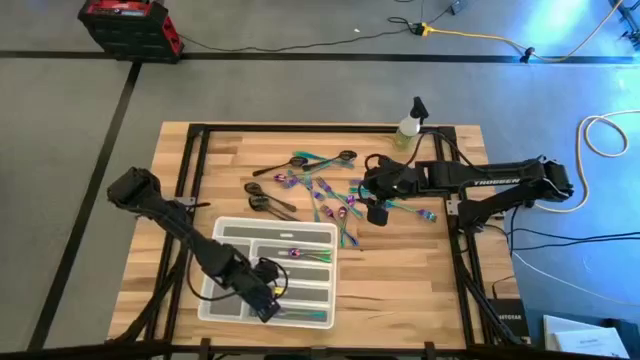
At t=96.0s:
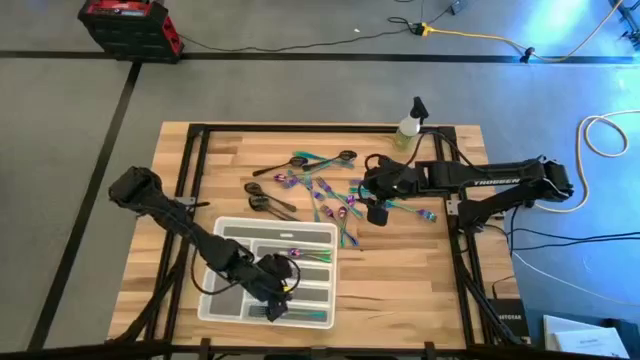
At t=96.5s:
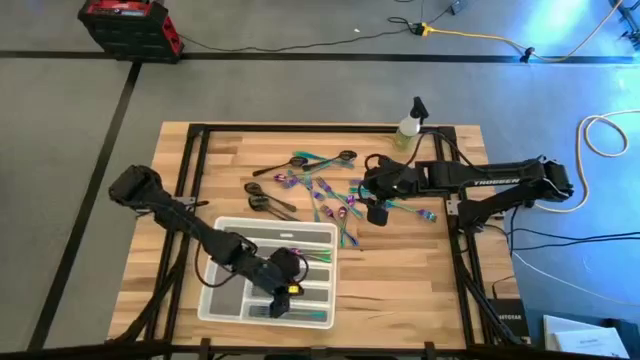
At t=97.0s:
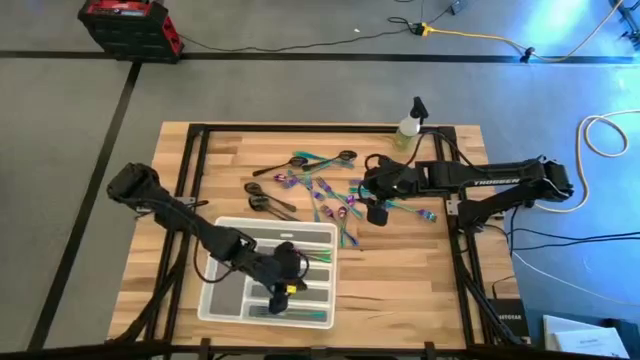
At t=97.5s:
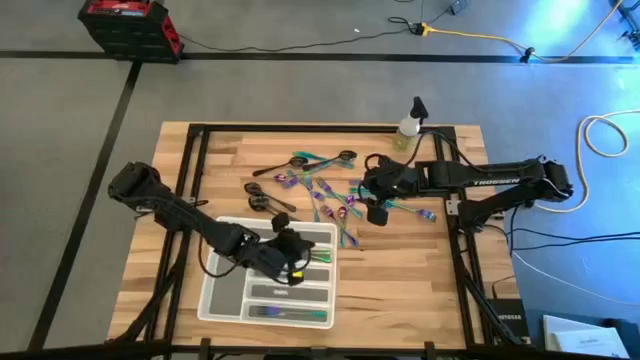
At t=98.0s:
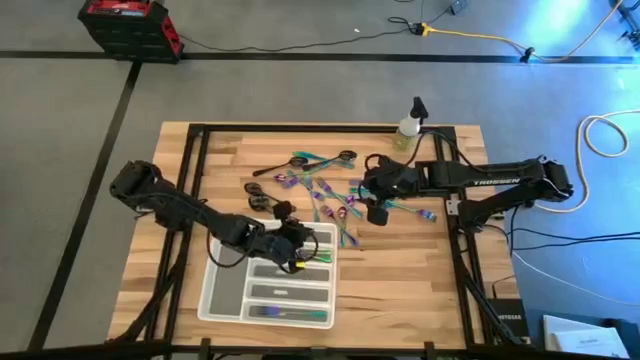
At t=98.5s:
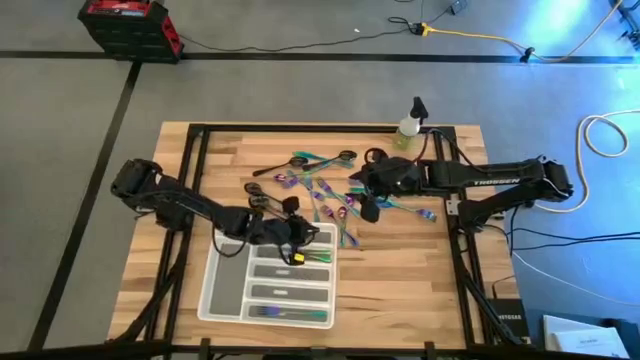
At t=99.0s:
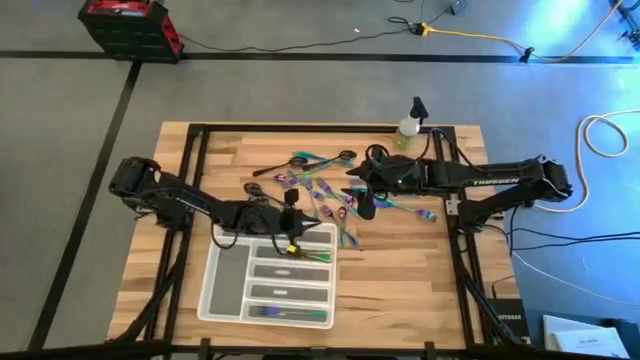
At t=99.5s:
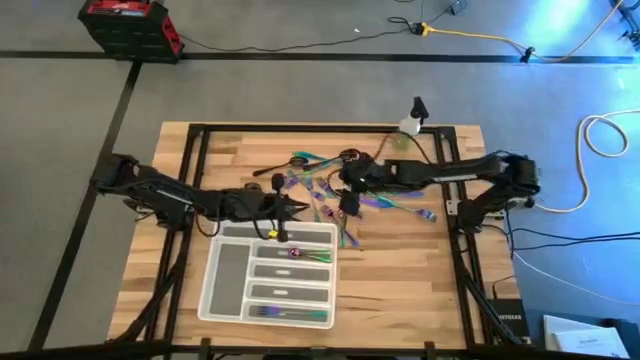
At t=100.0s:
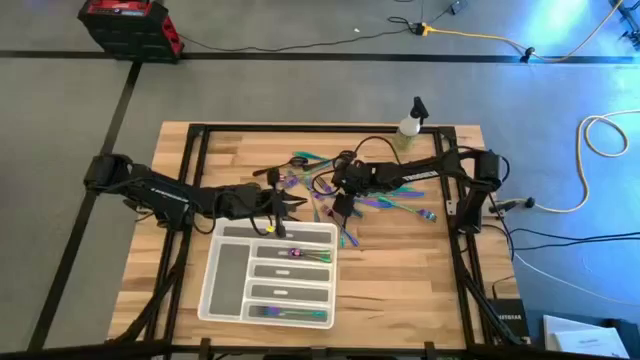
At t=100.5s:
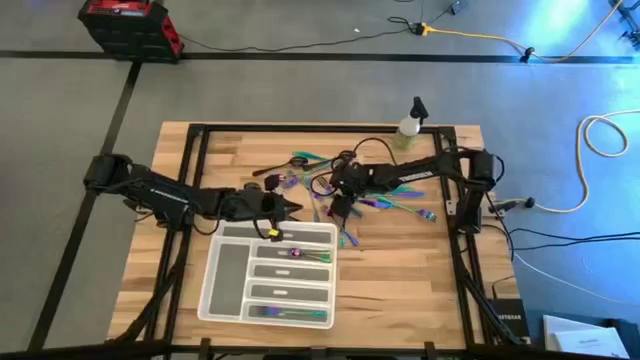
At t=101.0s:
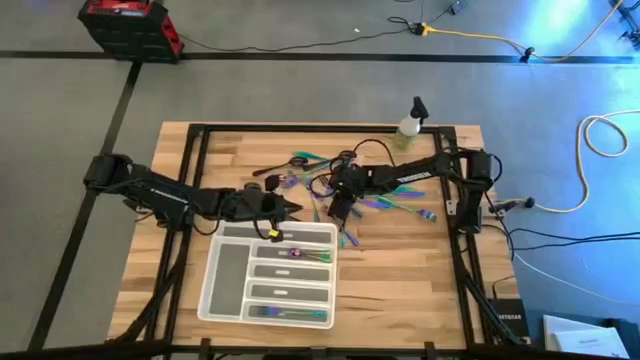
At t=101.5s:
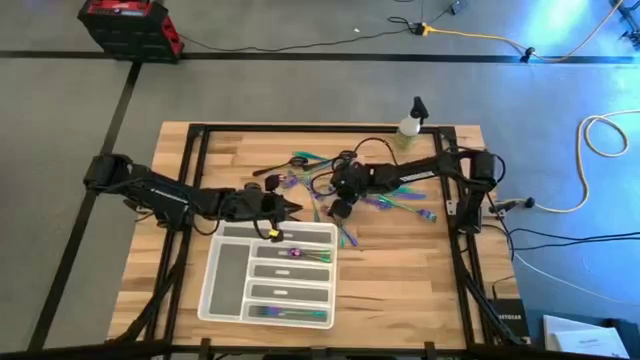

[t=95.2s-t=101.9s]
Task: Sort silverware
Put the blue fork into the white silverware tray

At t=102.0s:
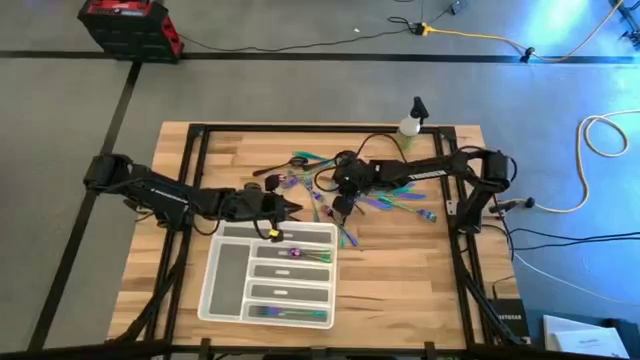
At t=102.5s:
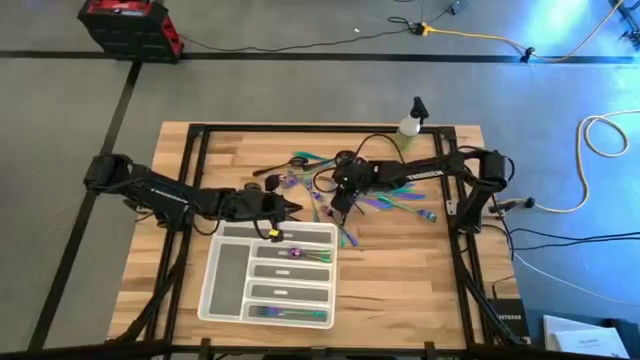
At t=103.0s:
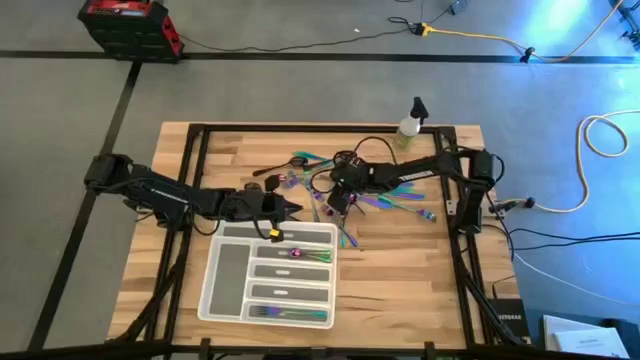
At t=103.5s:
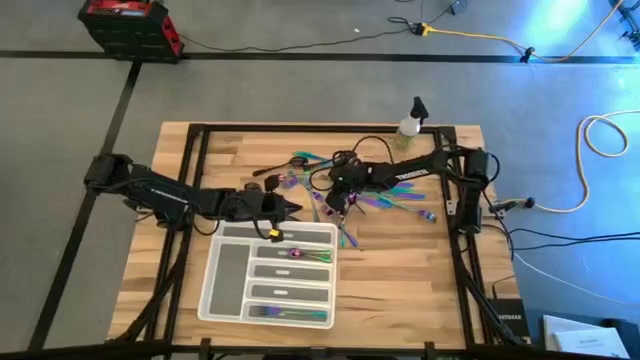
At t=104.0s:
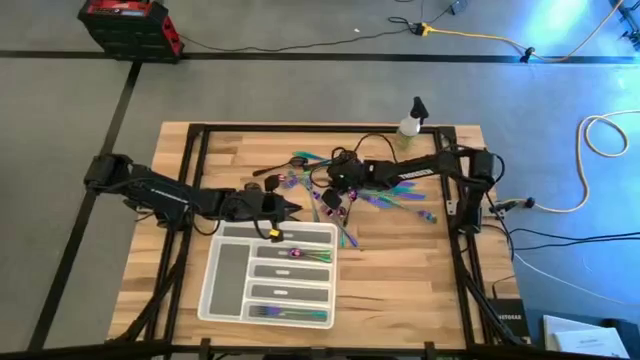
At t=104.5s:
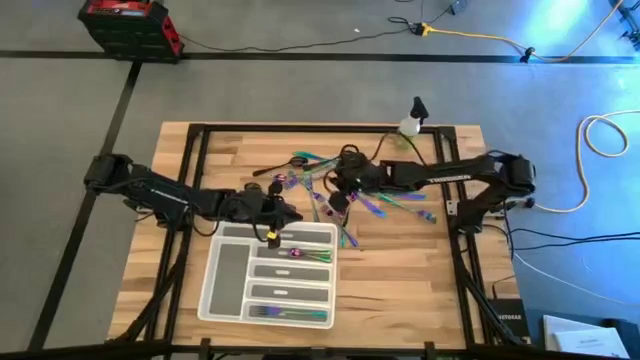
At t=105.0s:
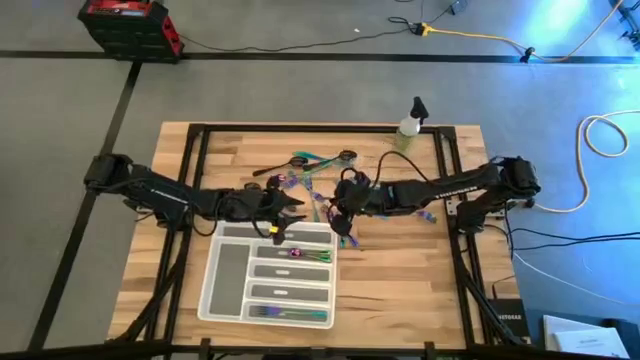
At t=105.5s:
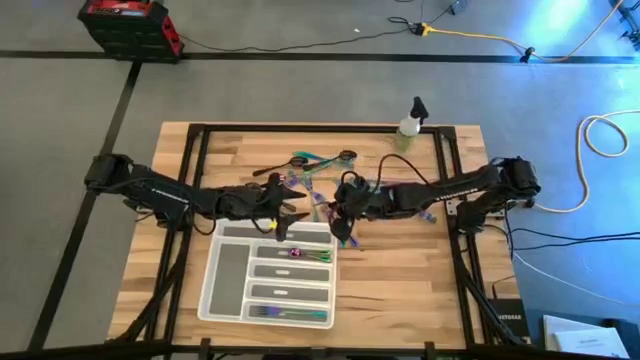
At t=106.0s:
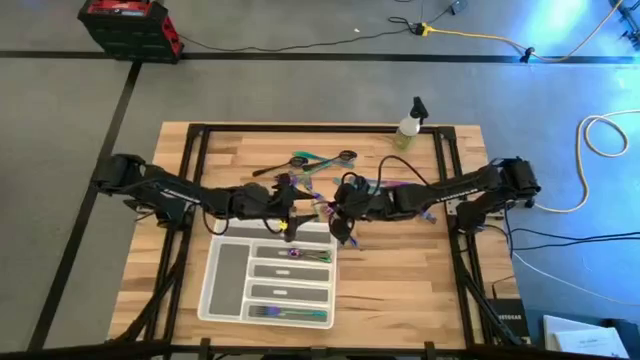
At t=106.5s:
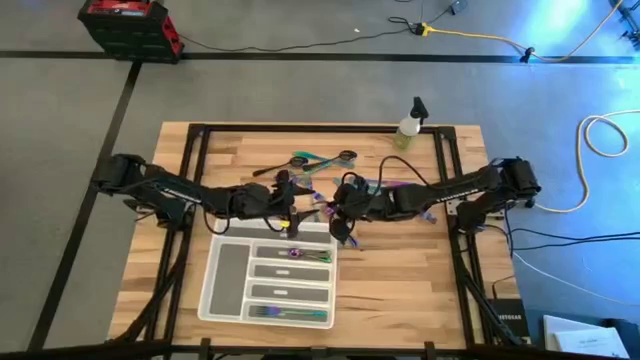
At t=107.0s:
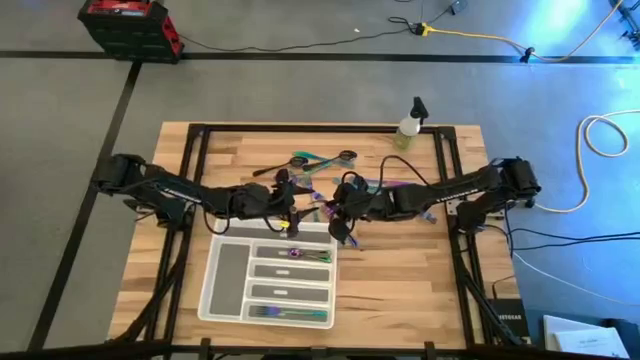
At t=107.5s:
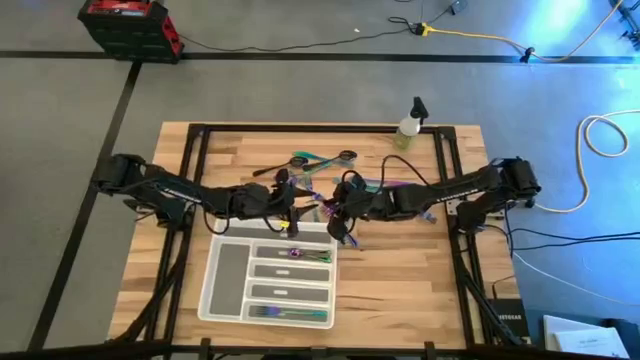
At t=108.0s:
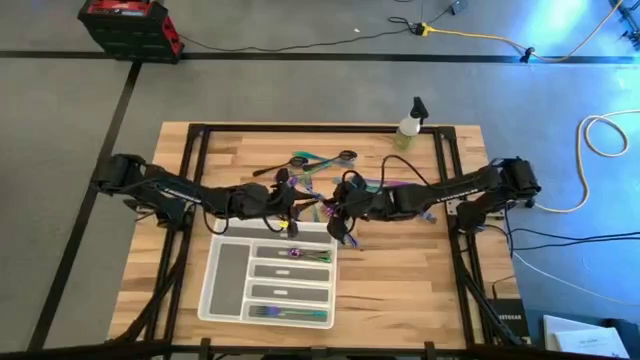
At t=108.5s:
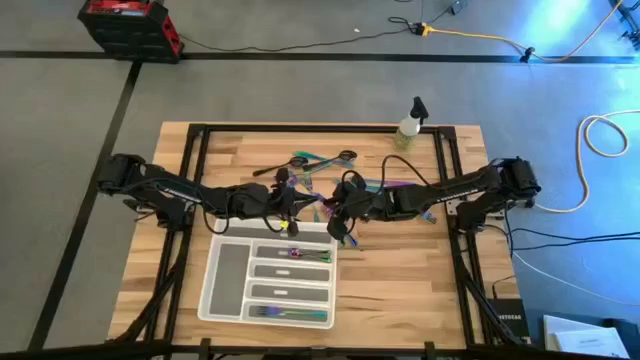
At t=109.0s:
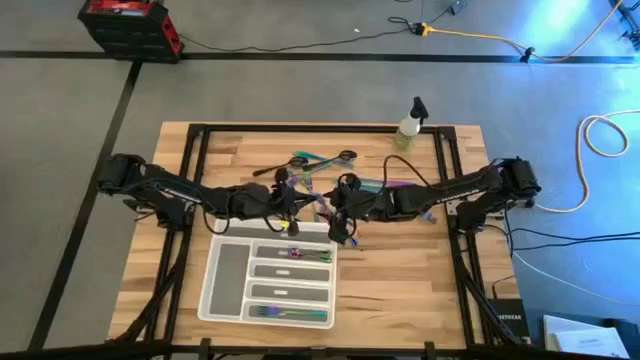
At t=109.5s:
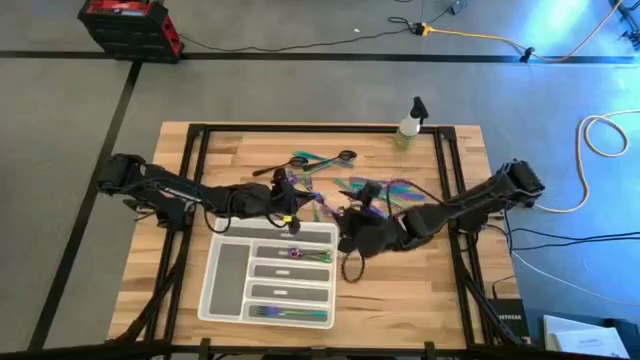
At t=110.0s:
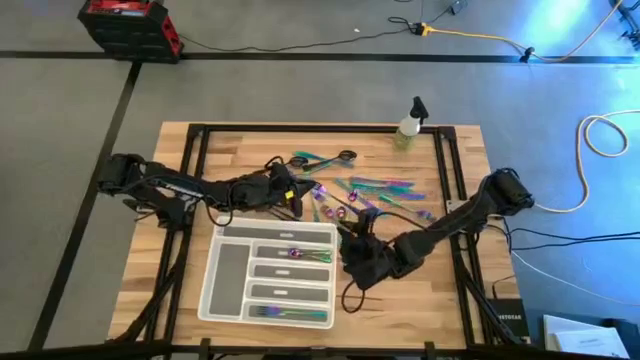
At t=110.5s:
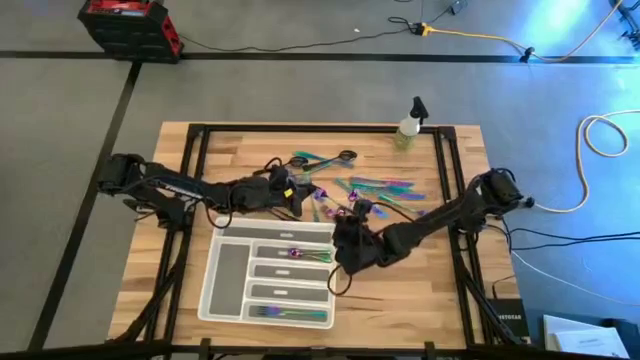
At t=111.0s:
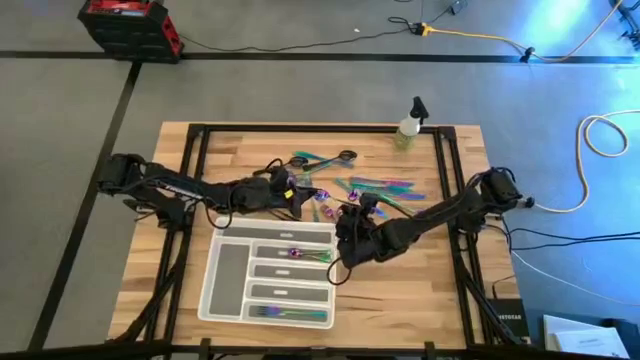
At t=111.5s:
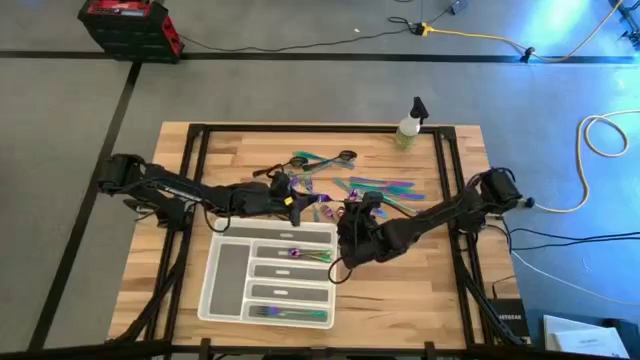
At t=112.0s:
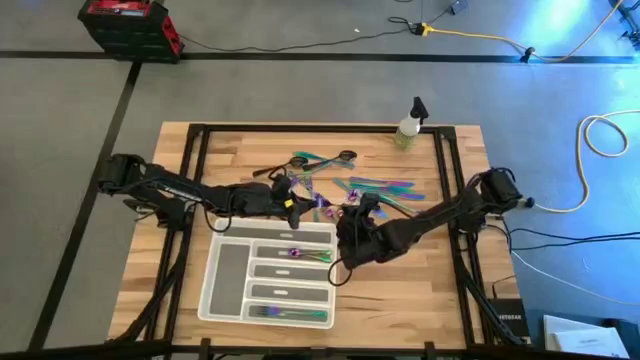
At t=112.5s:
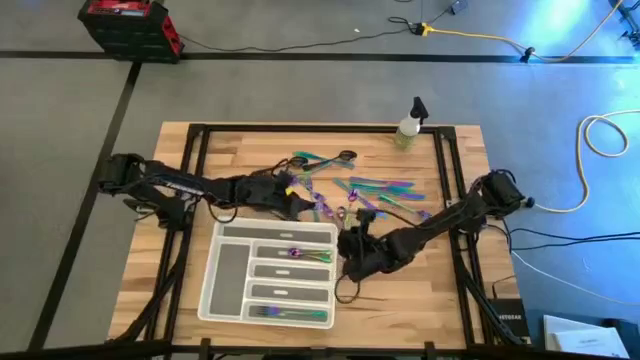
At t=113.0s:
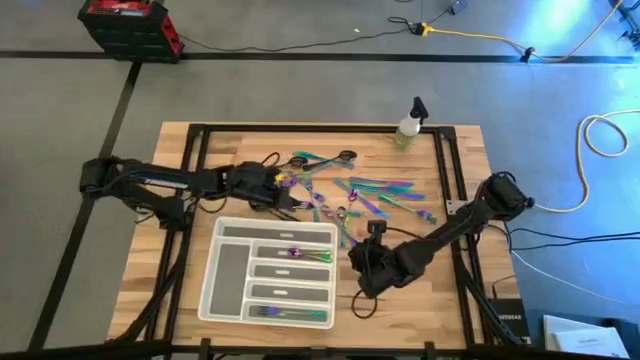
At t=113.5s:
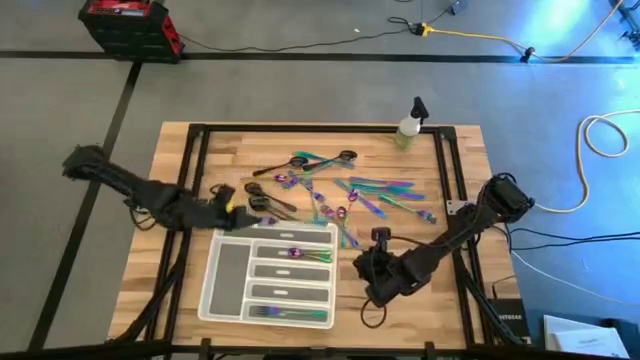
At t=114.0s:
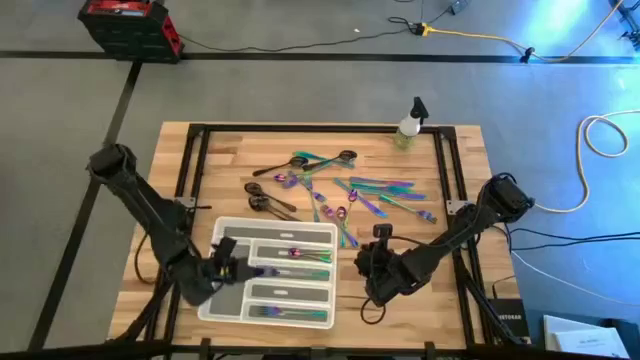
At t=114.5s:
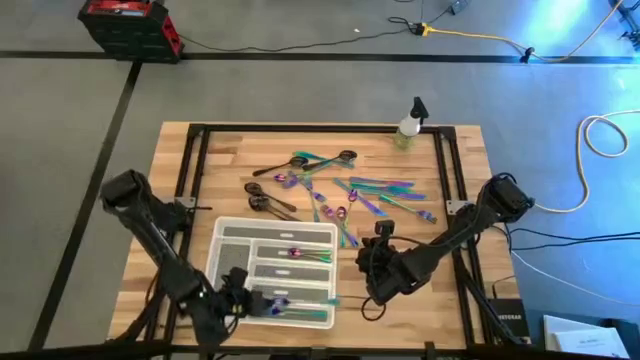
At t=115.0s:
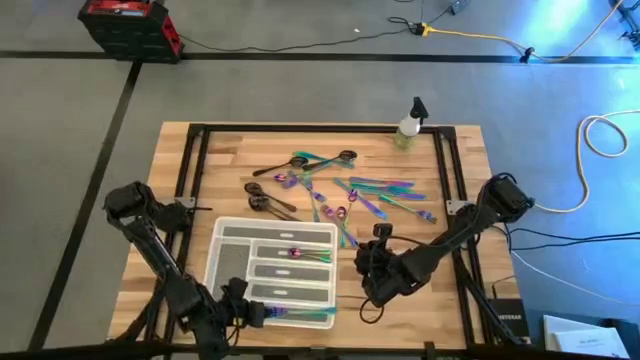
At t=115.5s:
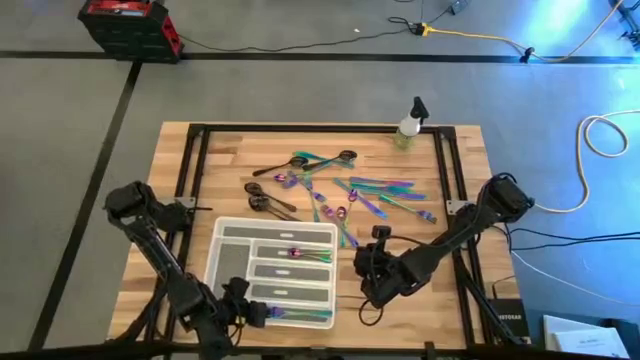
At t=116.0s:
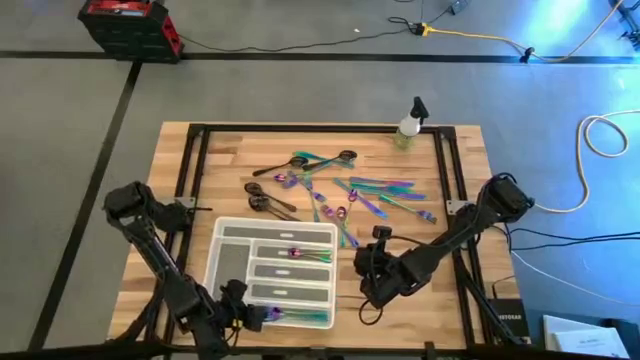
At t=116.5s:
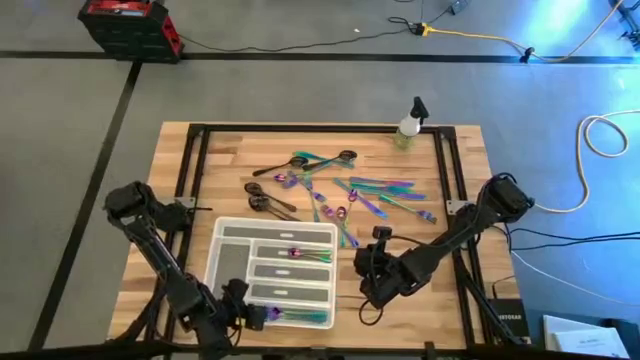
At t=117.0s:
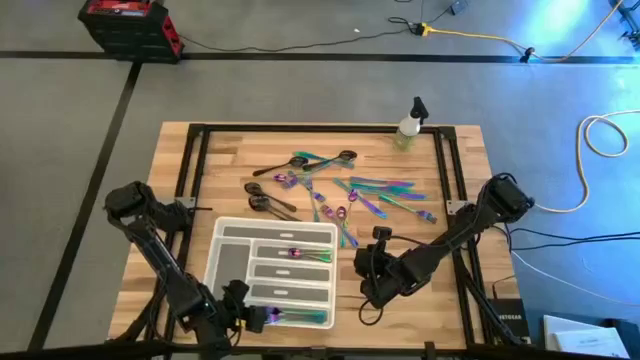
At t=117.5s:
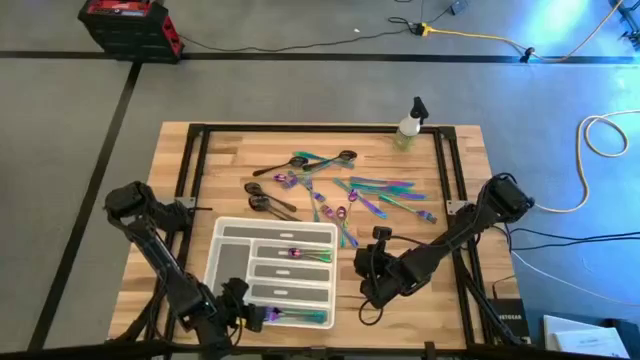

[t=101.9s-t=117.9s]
Put the blue fork into the white silverware tray
